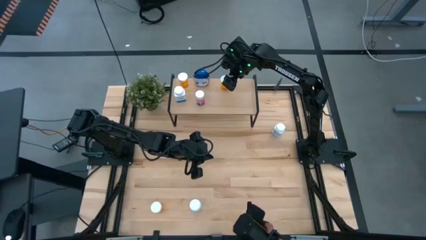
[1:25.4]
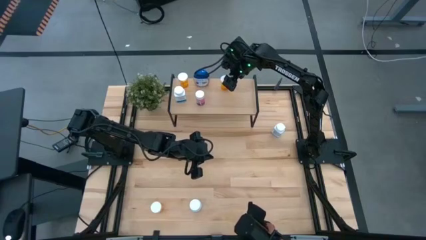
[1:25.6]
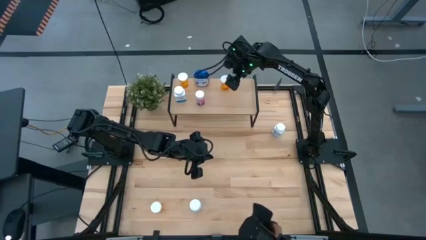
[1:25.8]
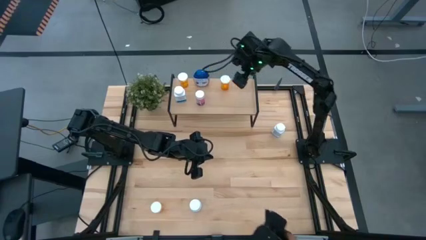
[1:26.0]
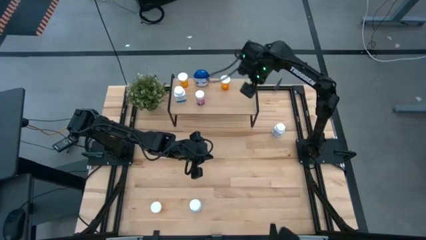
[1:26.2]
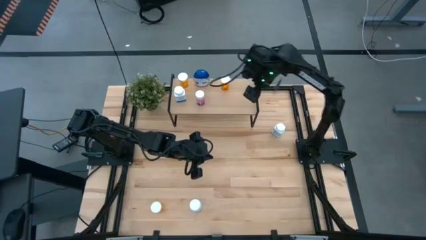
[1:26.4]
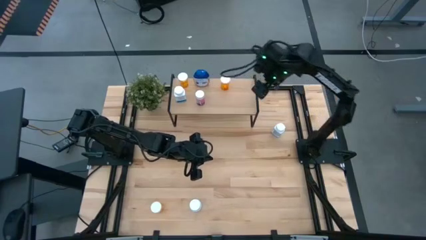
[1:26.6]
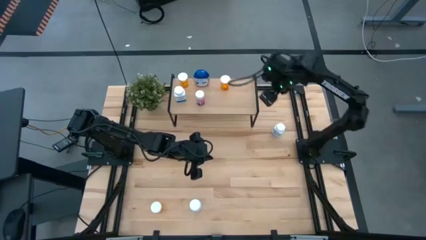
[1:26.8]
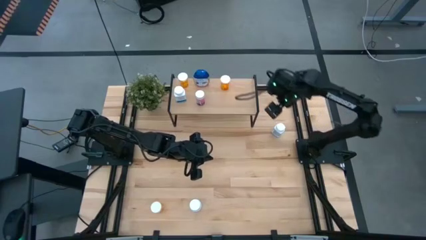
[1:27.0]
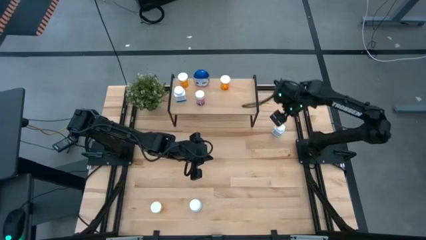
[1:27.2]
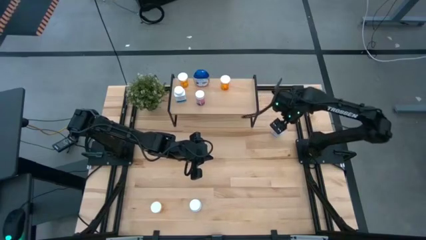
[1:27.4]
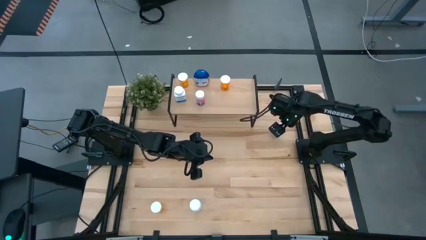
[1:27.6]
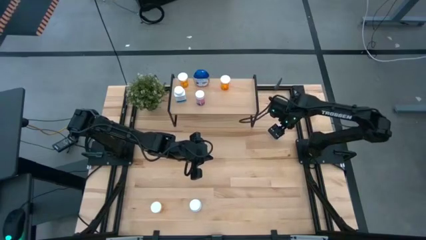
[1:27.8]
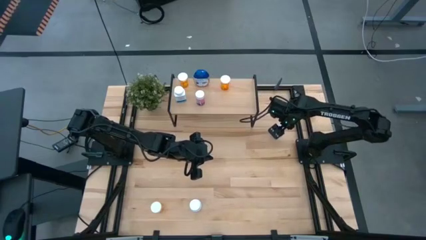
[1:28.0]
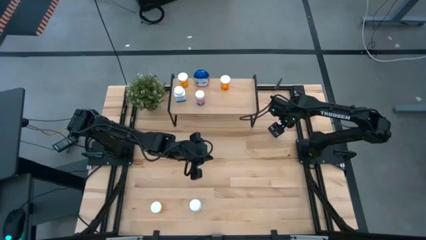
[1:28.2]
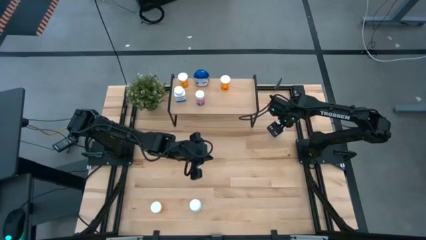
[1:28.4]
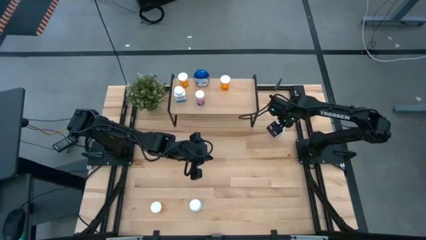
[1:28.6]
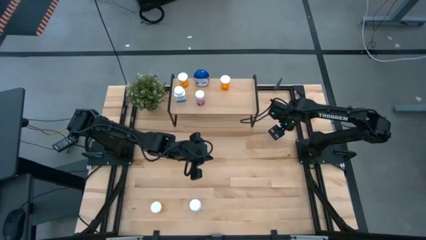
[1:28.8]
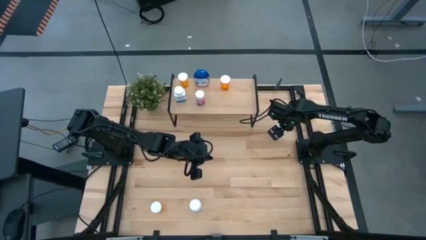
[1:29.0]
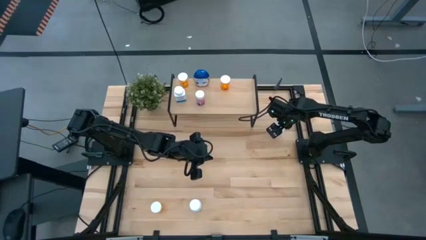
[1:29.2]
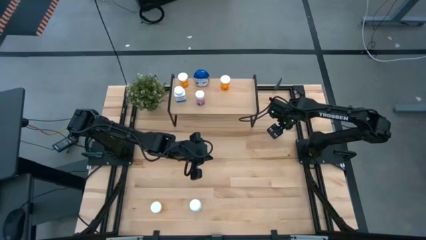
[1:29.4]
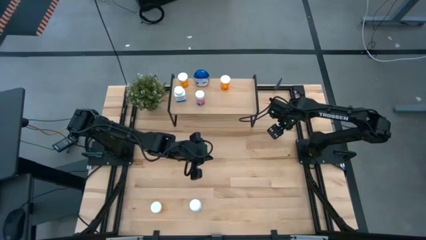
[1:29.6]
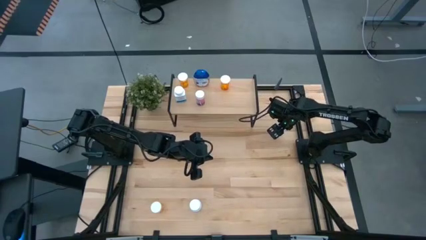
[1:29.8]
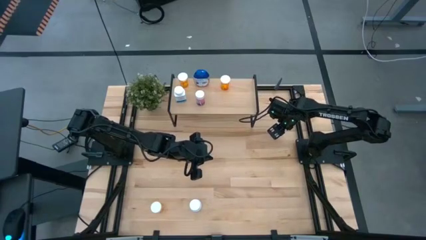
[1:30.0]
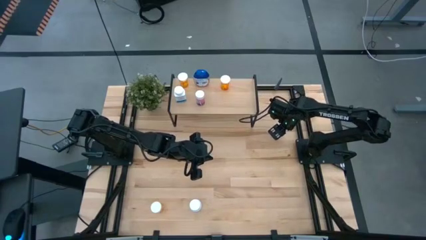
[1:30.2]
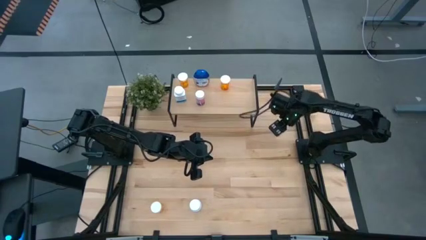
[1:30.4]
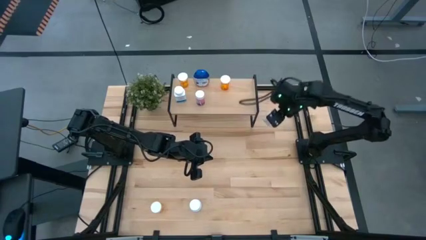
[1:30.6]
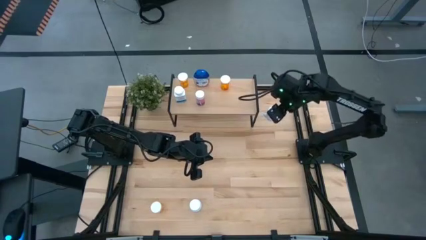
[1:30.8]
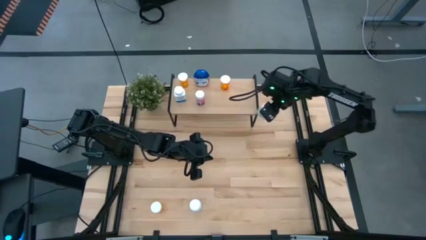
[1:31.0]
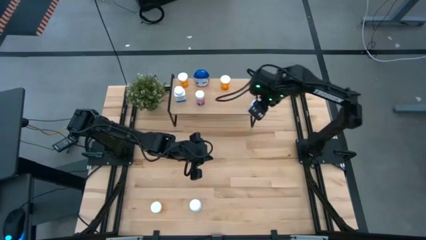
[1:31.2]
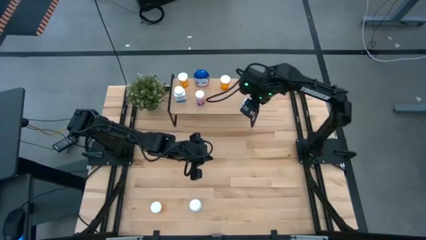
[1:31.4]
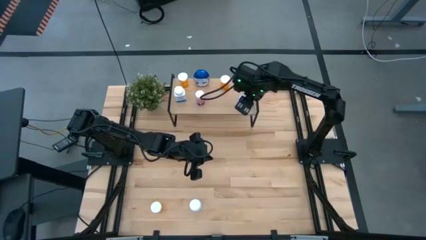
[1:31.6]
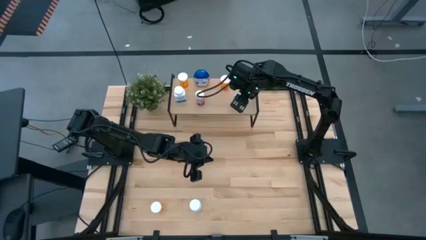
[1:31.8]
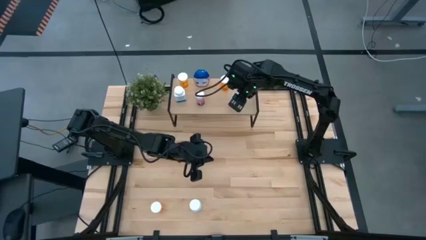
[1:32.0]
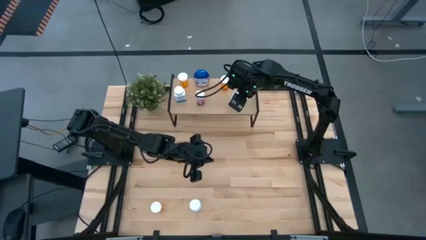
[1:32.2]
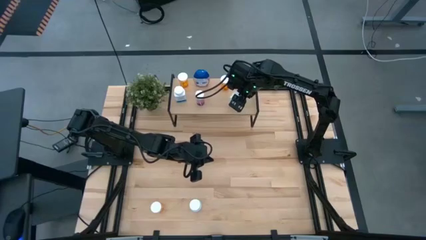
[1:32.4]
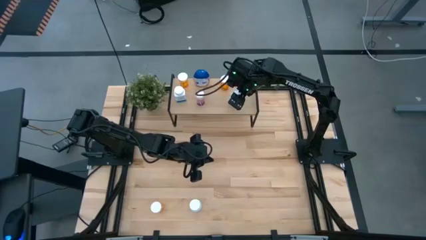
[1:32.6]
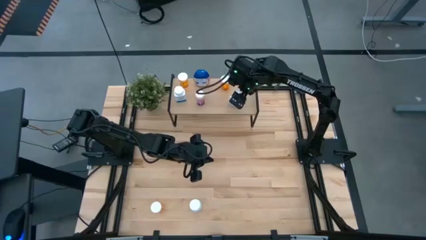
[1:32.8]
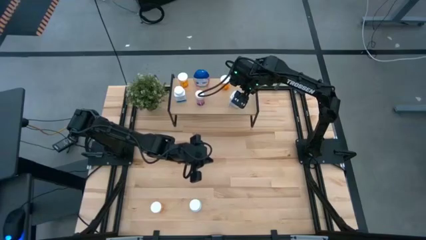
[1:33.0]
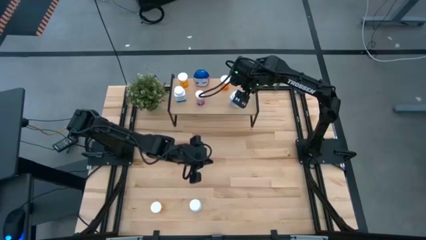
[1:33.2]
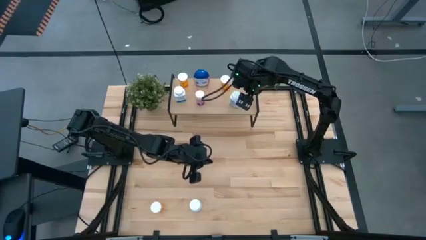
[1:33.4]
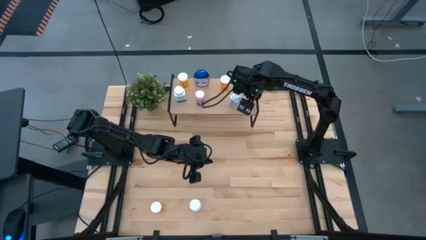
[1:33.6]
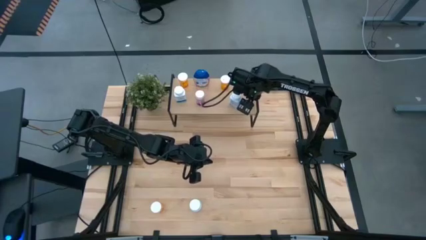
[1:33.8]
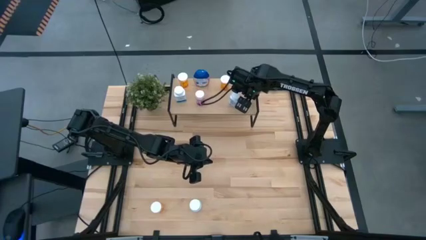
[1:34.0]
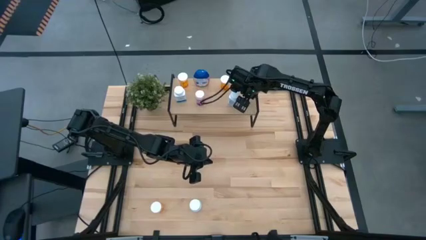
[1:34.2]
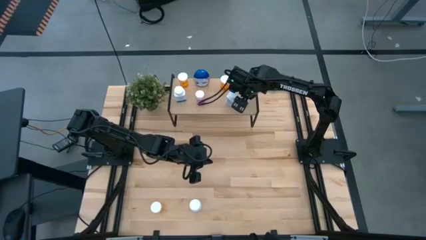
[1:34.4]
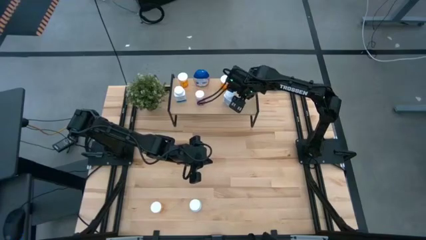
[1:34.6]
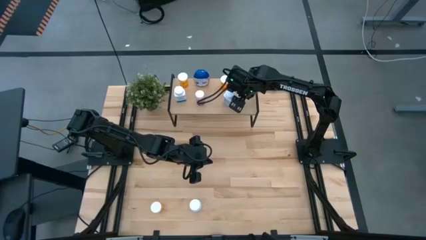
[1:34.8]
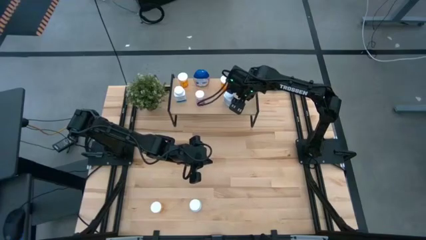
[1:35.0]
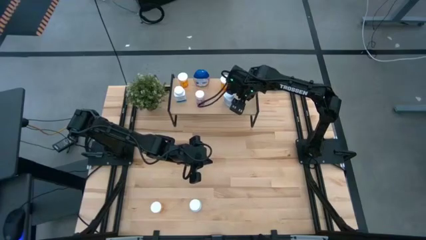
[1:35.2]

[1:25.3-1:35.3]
Task: Pick and place medicine bottles onto shelf by color
Put the white blue pill bottle on the shelf

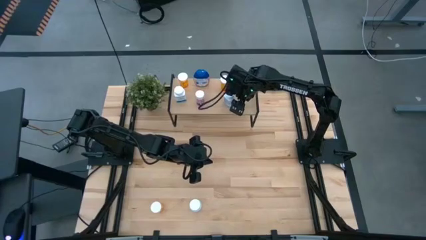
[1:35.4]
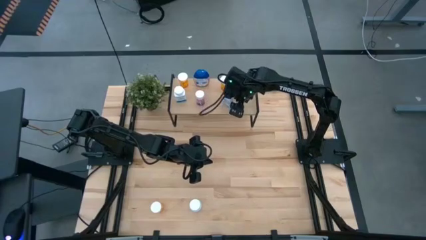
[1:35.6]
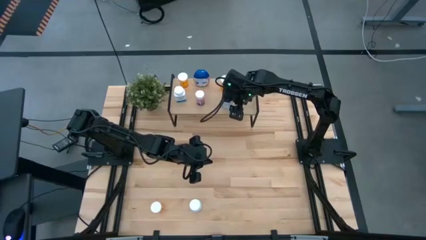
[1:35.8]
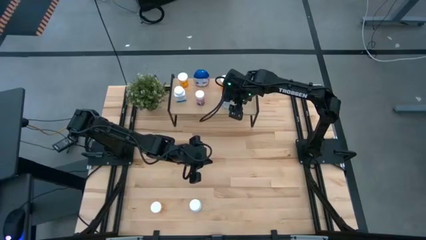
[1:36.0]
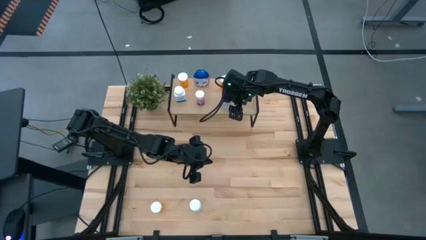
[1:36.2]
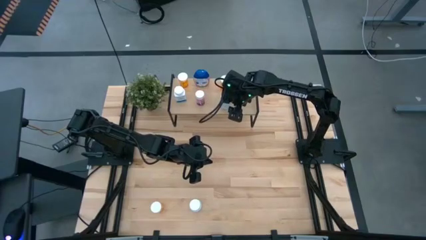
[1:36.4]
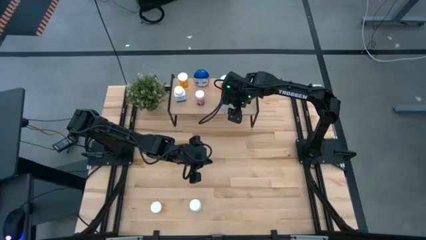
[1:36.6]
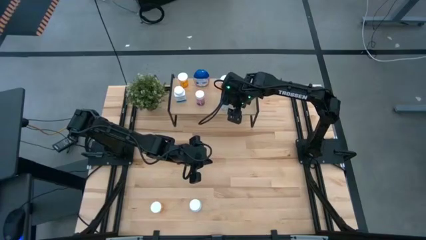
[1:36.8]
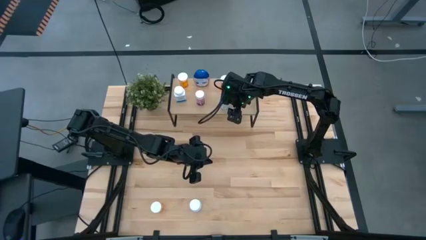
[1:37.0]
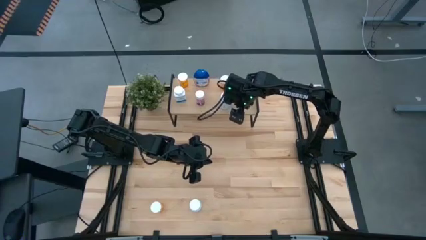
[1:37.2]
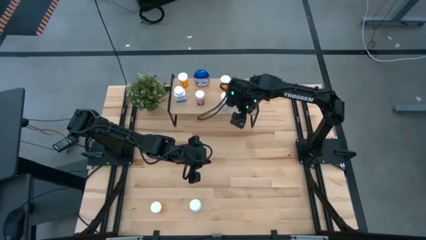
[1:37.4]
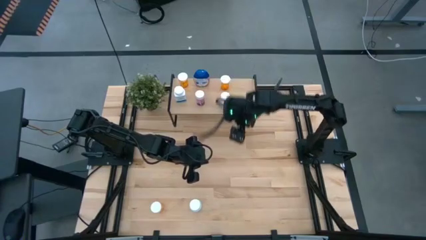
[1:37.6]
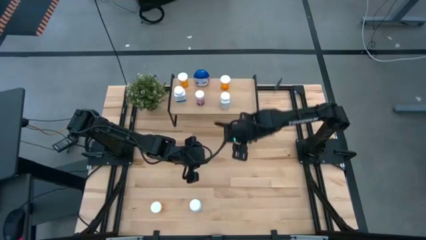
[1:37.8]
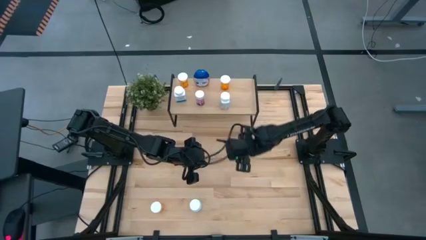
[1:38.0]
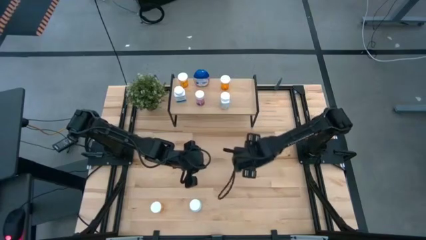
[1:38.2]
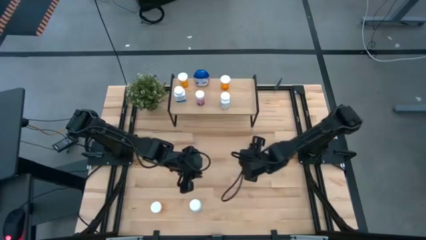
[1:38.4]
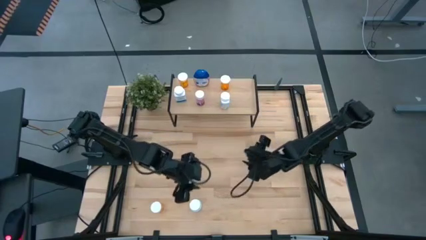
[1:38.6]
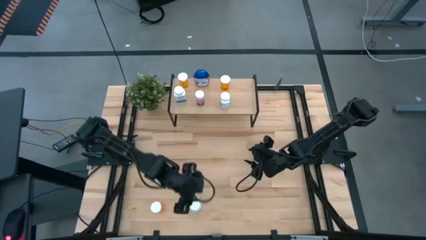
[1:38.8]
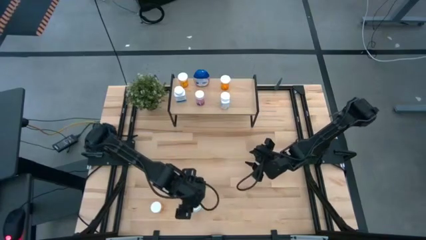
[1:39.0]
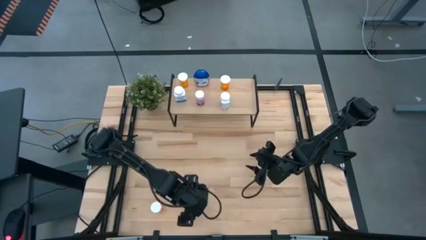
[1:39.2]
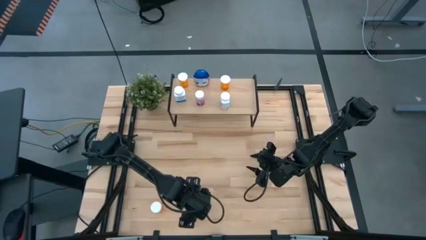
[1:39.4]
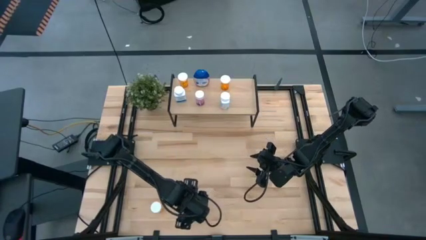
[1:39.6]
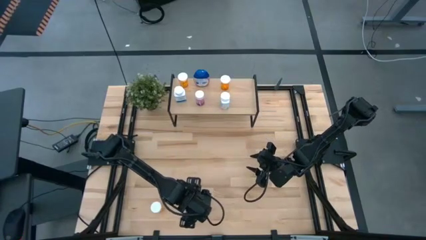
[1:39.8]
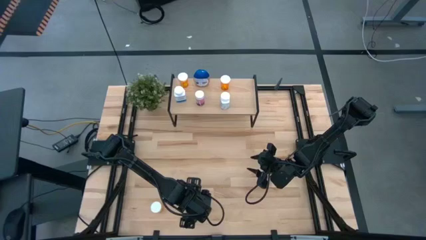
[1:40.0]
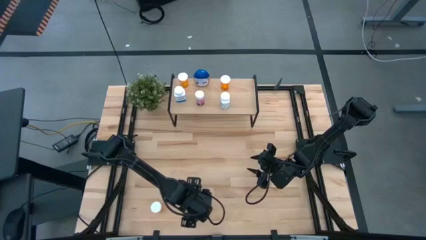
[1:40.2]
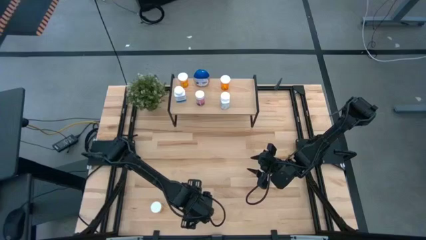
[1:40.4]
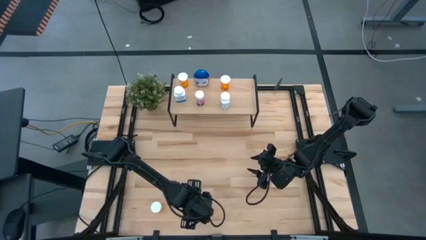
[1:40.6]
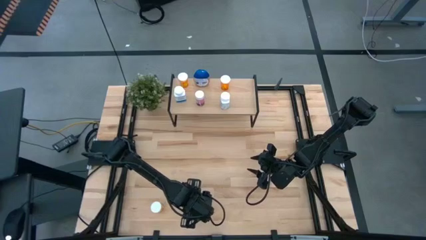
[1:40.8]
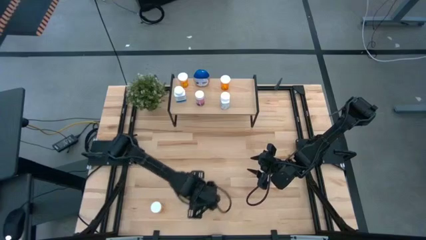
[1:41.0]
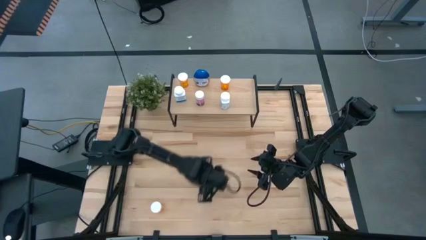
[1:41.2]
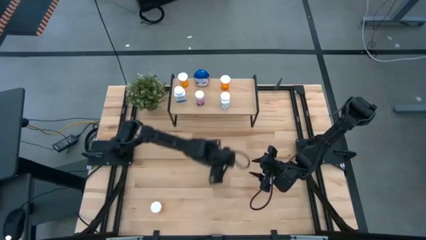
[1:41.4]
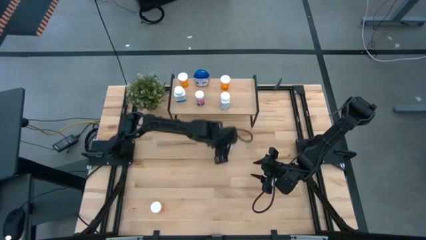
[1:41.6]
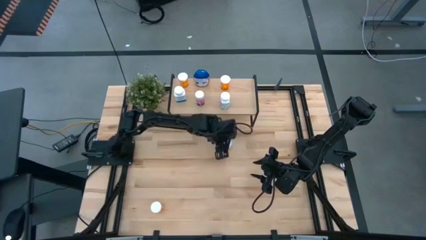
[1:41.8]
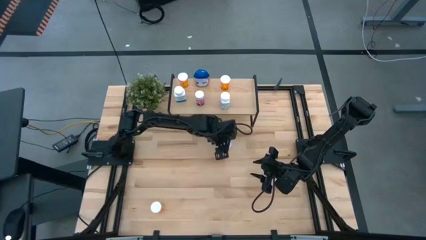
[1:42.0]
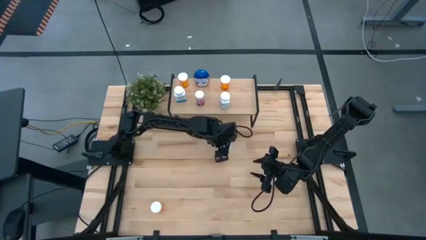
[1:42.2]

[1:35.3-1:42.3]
Move the white pill bottle to the center of the table
